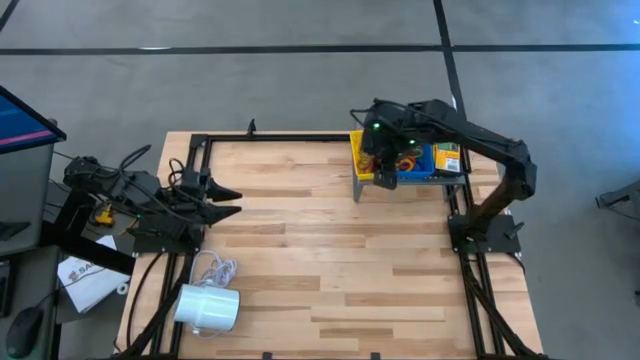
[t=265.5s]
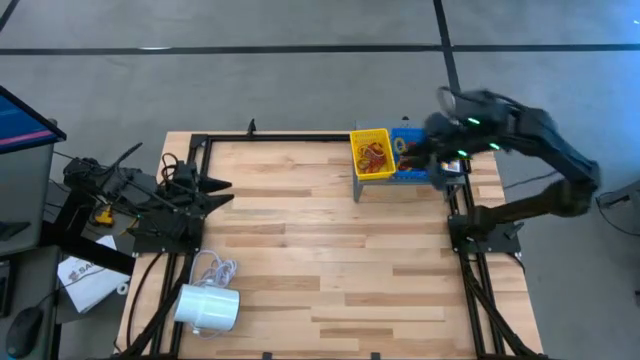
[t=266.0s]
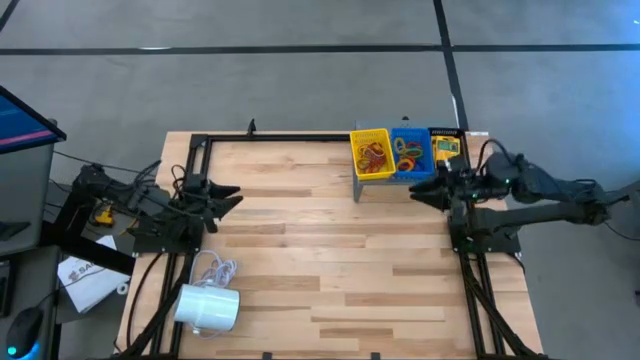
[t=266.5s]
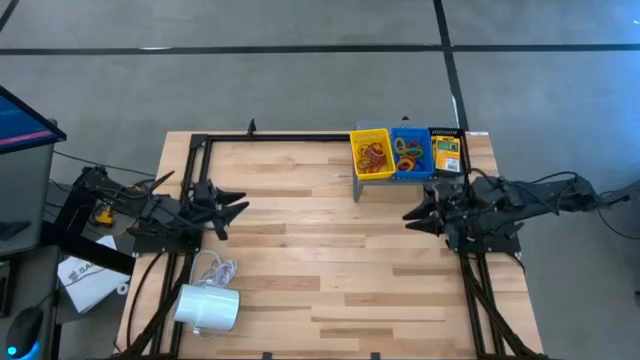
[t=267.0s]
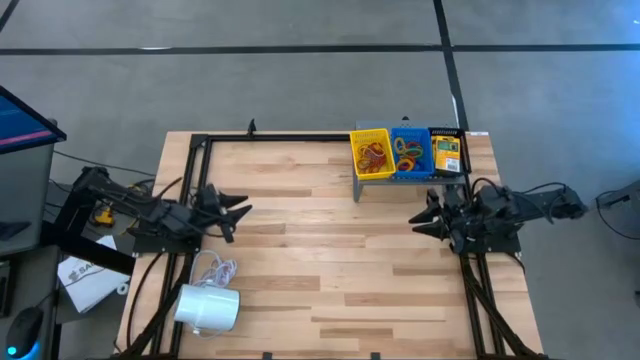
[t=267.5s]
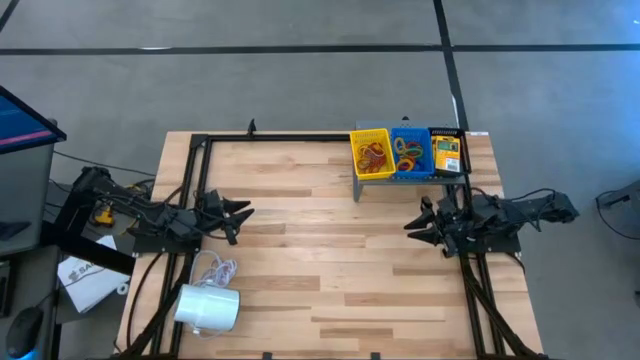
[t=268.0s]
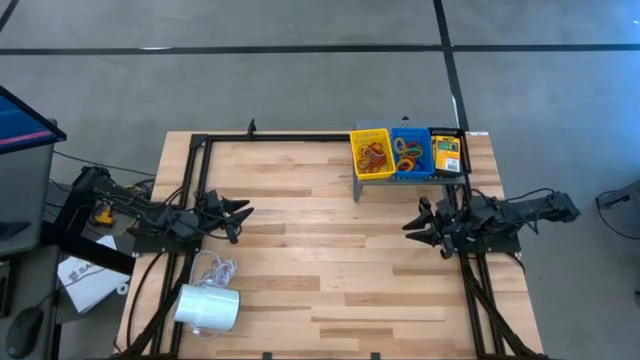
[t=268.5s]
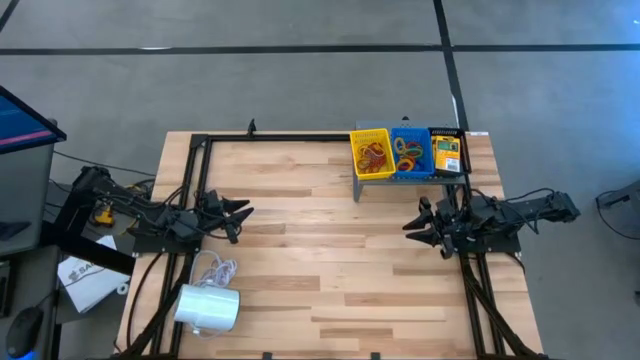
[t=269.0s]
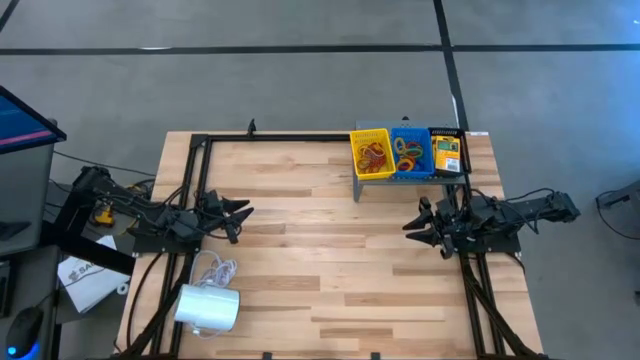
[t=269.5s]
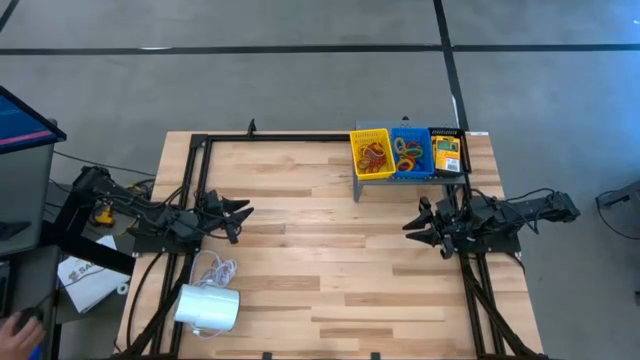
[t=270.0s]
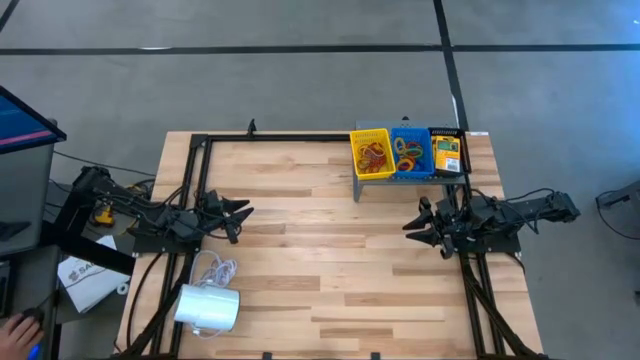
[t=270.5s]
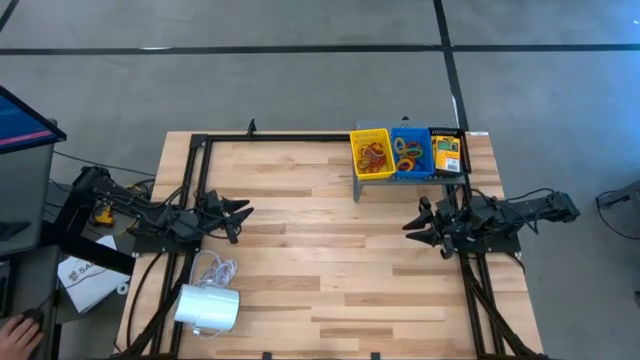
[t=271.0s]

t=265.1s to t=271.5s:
Task: Pick & Place Office Desk Supplies
Return to Home Position

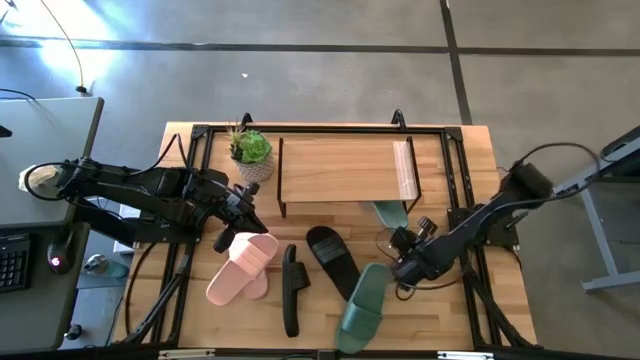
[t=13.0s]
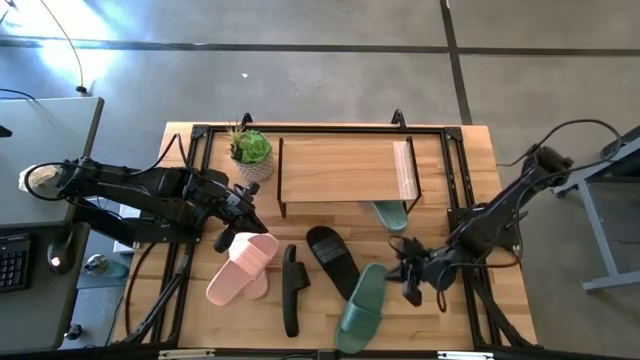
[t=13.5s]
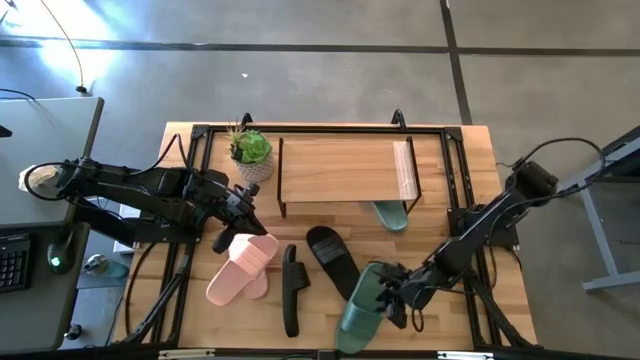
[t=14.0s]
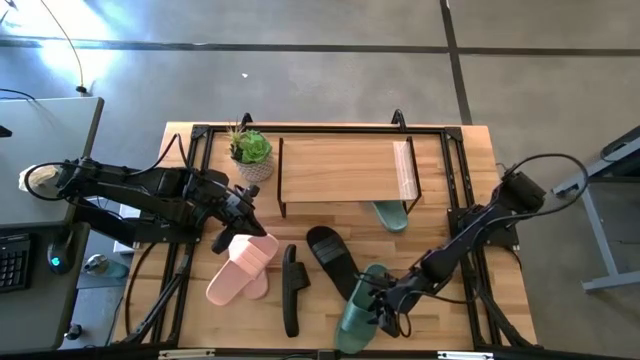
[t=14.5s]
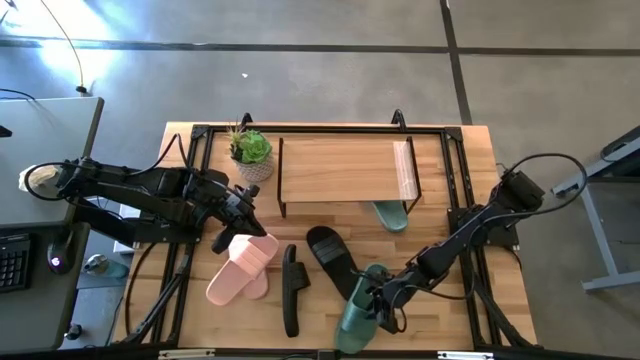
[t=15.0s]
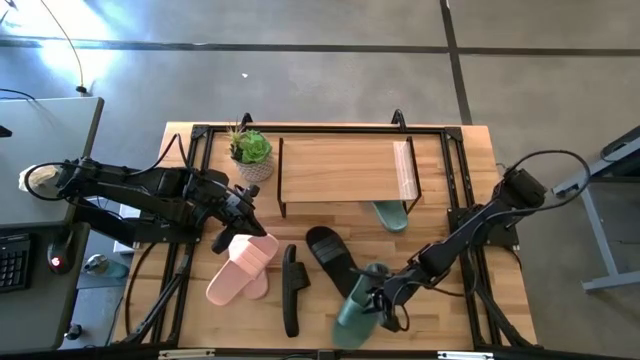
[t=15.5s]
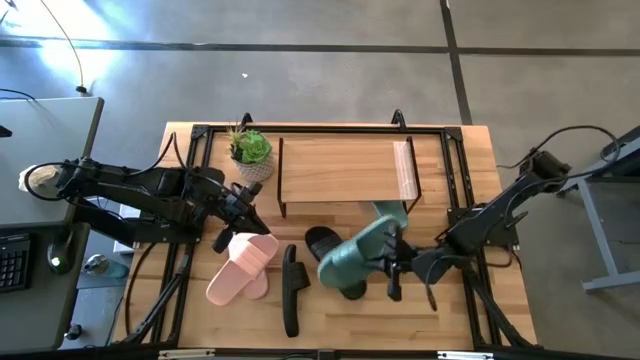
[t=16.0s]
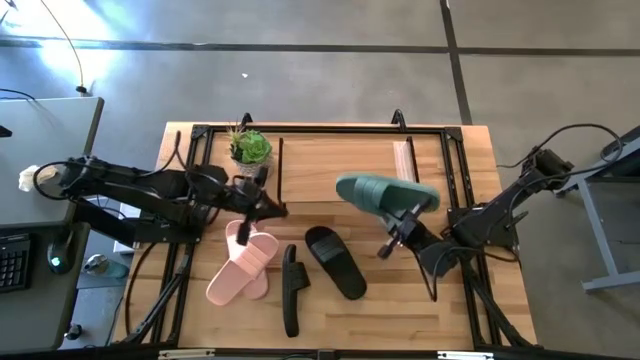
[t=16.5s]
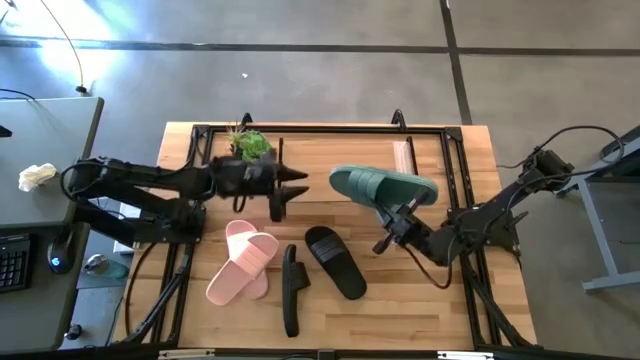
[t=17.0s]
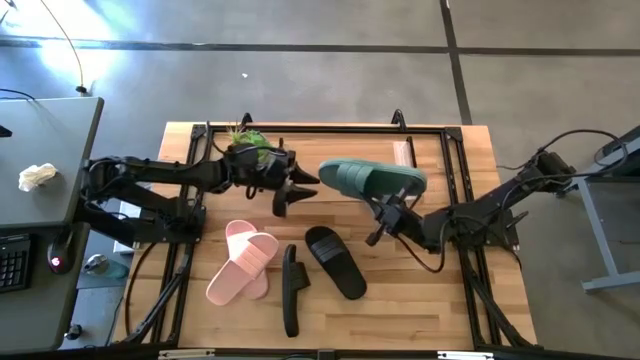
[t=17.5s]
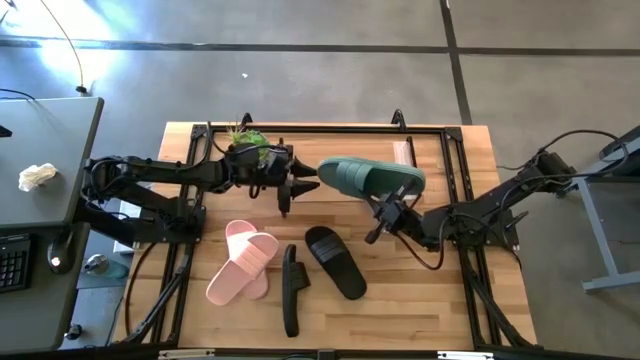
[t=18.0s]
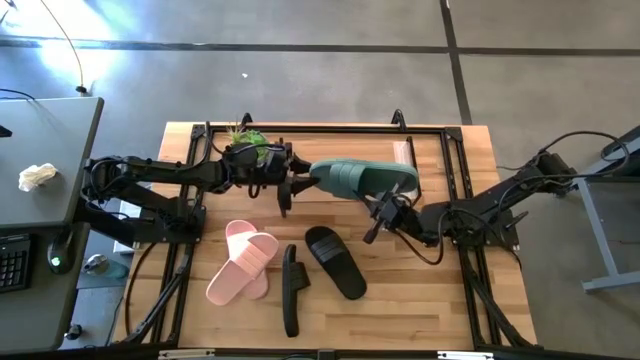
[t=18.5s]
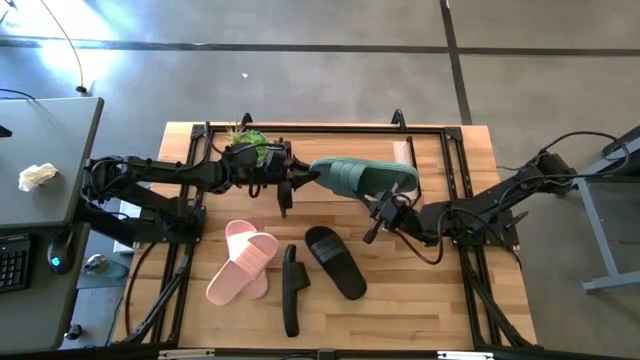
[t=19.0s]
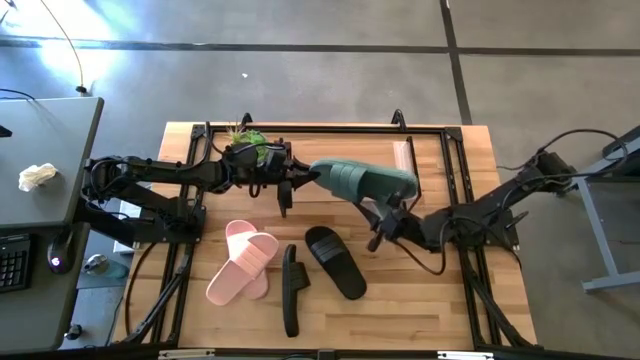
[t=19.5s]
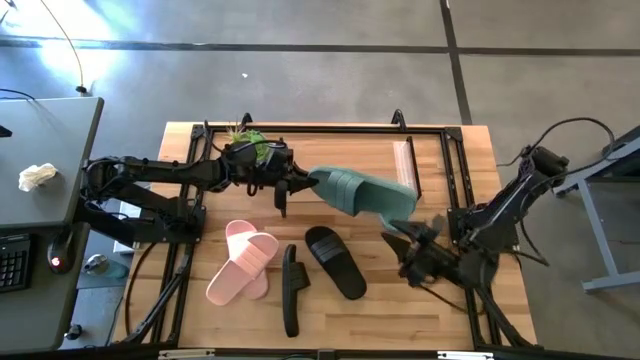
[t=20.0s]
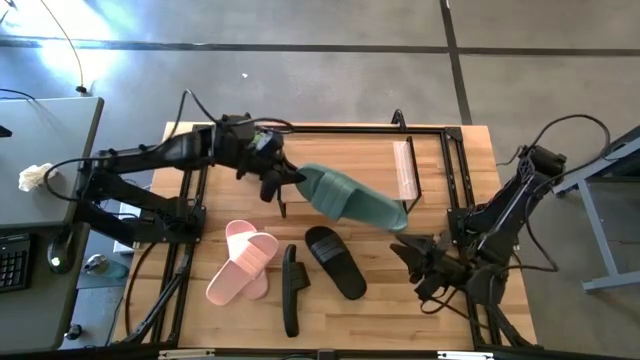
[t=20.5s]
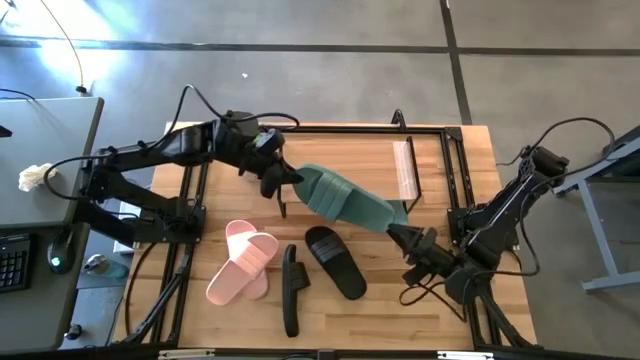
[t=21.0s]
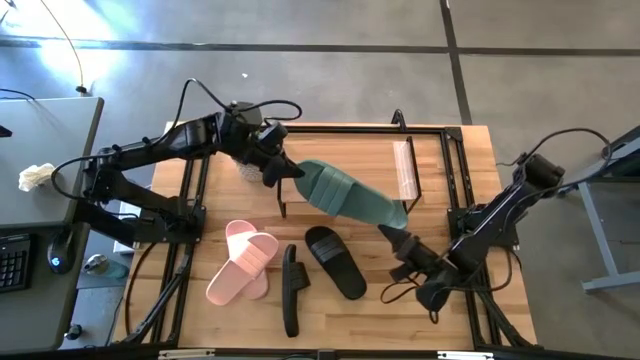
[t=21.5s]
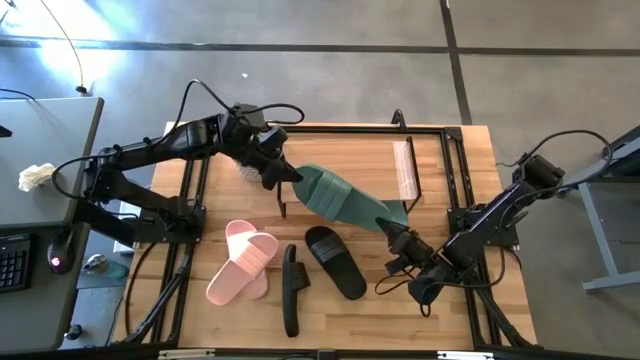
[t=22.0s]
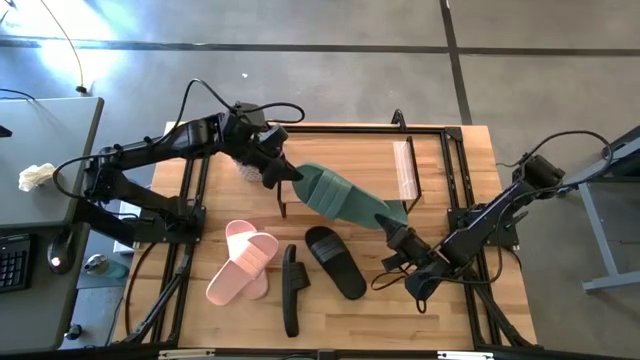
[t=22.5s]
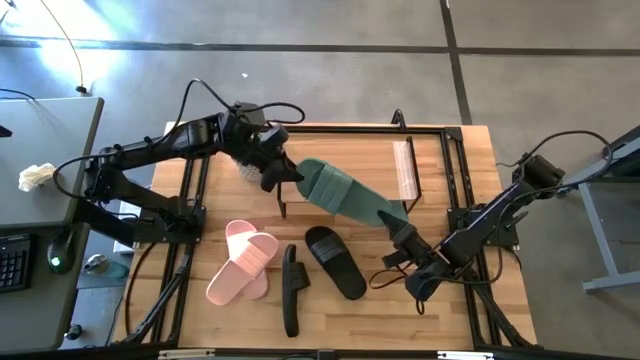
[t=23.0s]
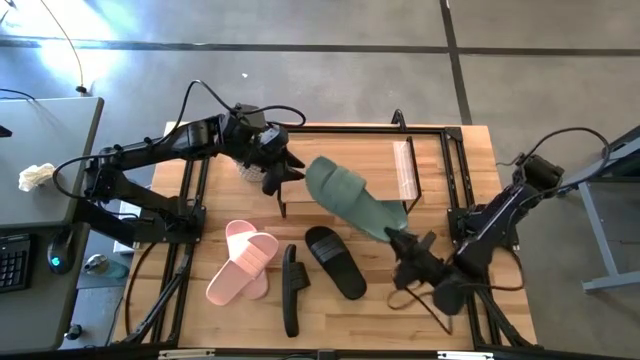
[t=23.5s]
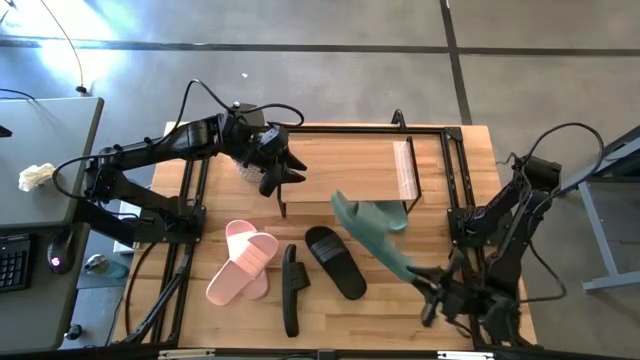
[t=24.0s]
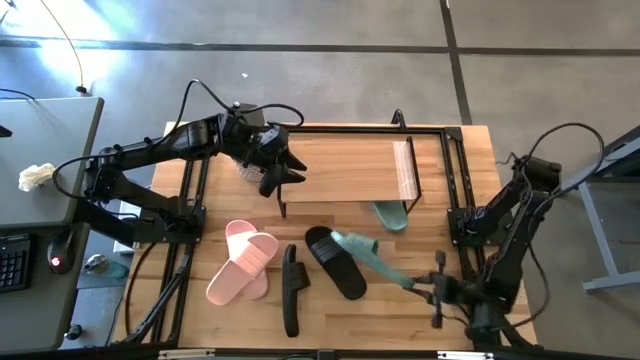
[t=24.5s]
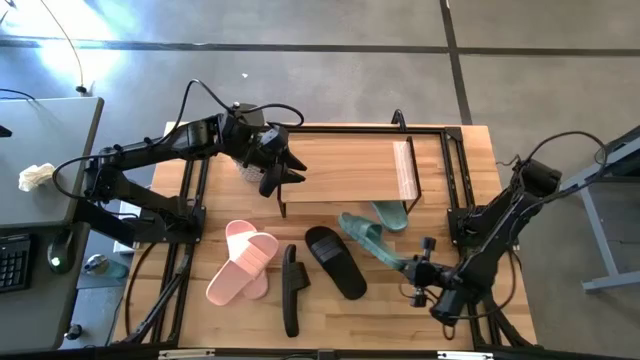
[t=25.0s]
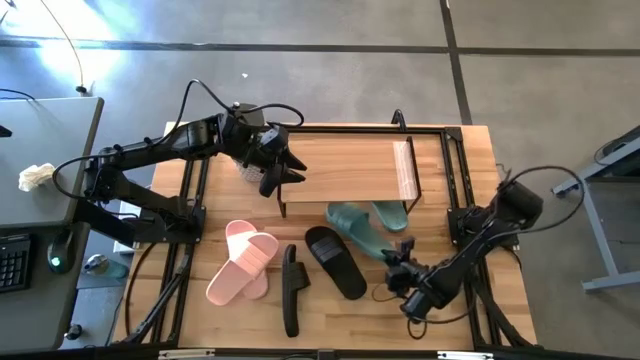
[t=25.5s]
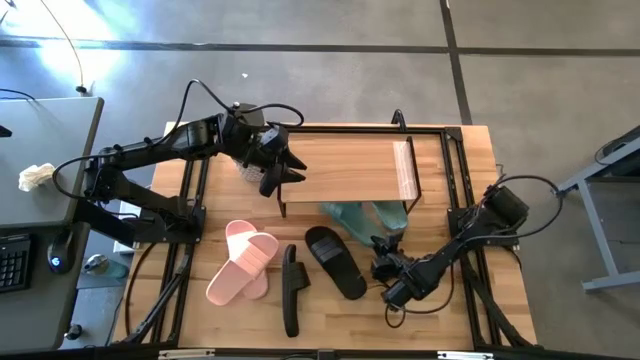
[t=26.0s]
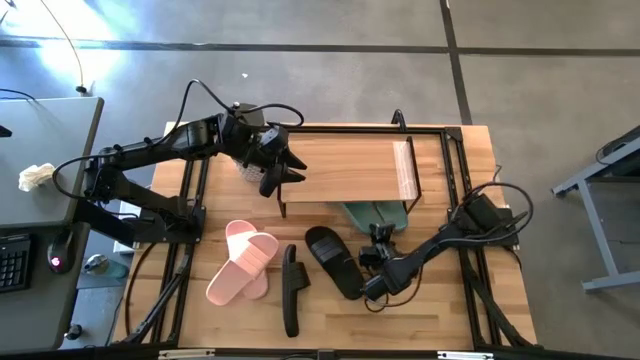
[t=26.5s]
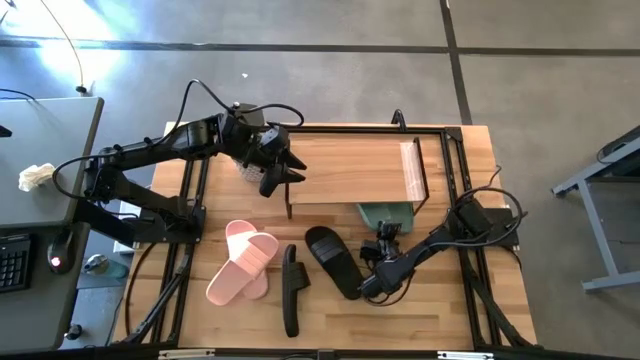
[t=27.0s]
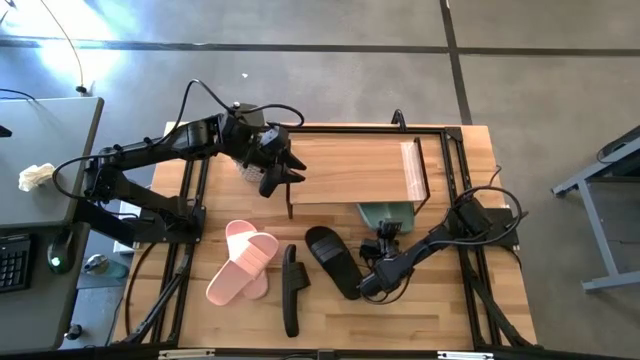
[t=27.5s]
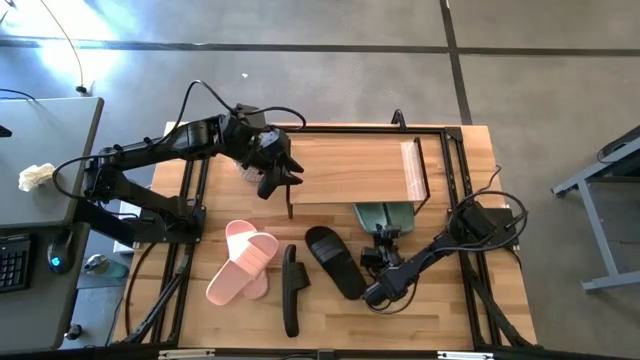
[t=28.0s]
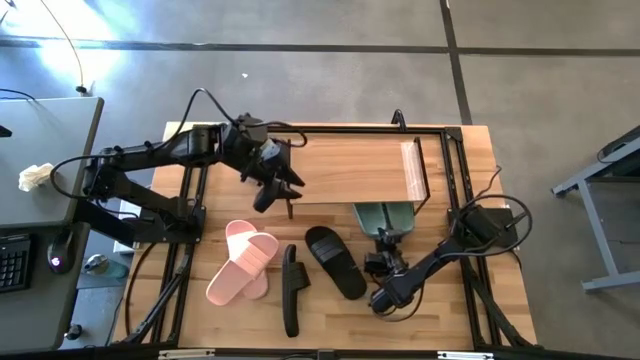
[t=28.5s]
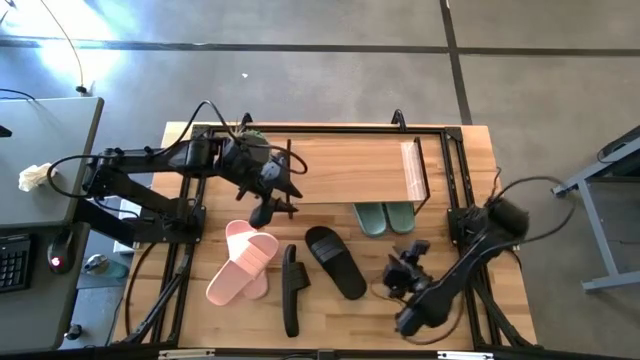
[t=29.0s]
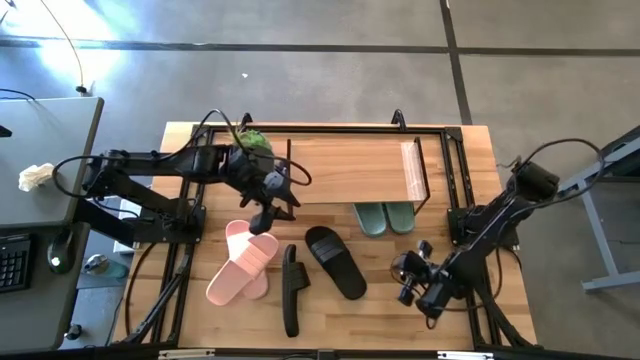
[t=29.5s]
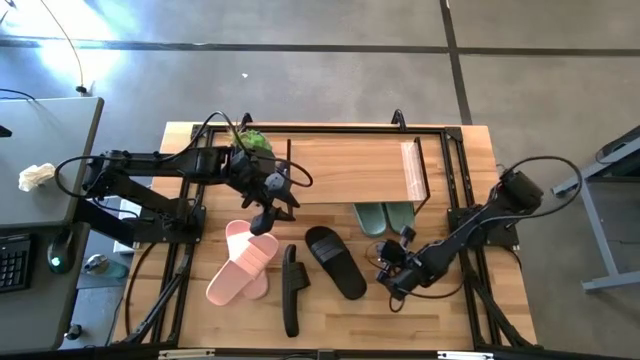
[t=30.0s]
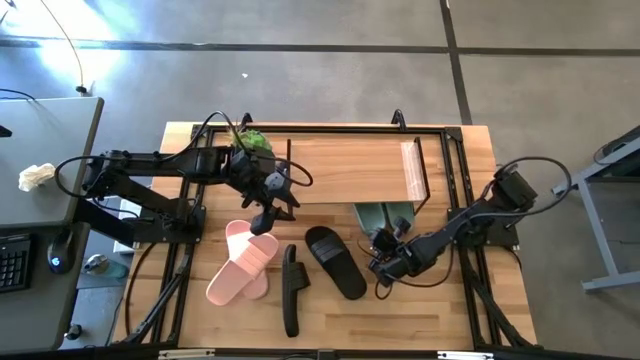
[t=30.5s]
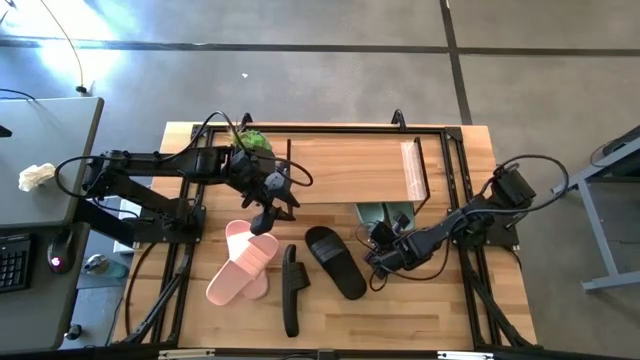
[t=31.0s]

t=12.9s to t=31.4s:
Task: Pick and place slides into the shelf
Put the green slipper under the shelf
